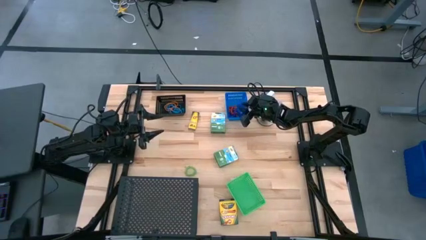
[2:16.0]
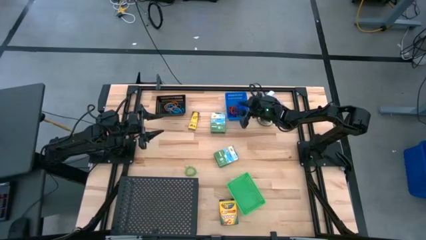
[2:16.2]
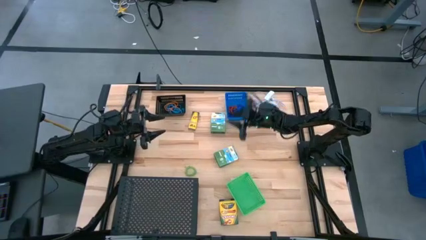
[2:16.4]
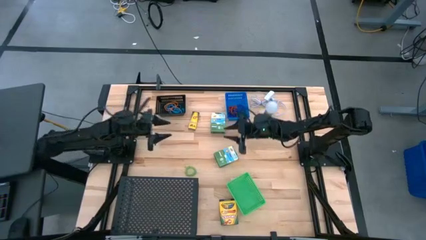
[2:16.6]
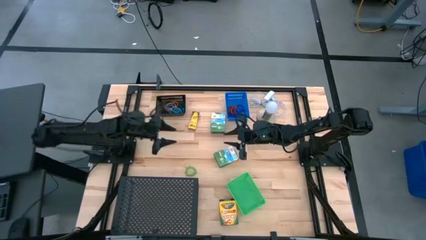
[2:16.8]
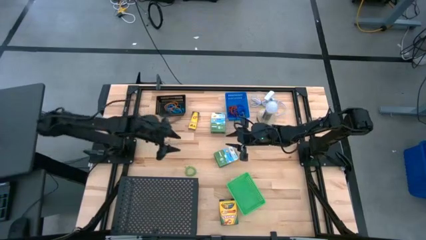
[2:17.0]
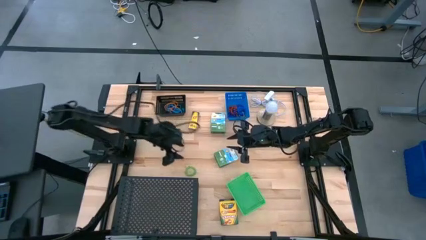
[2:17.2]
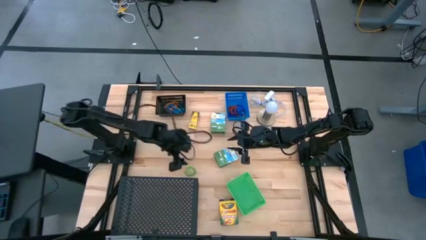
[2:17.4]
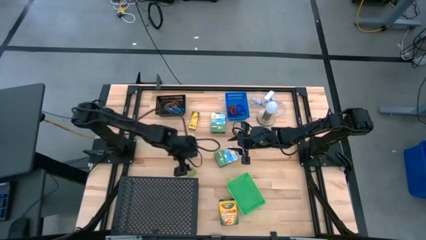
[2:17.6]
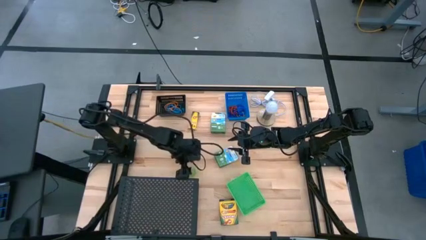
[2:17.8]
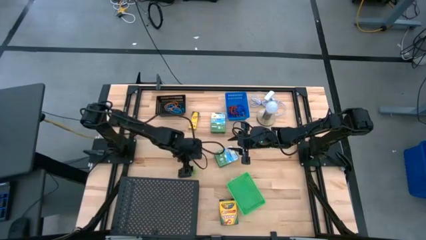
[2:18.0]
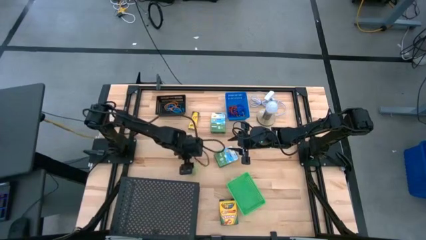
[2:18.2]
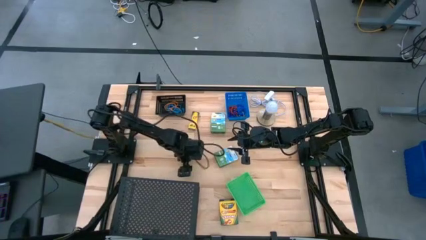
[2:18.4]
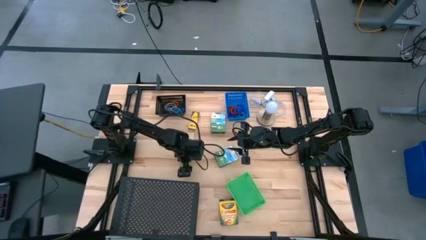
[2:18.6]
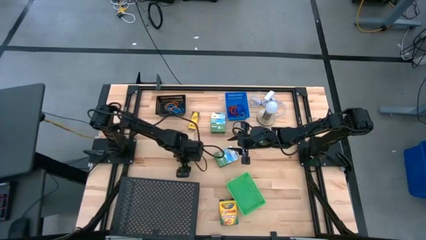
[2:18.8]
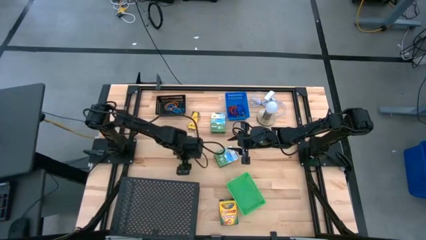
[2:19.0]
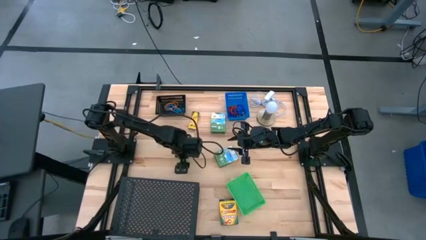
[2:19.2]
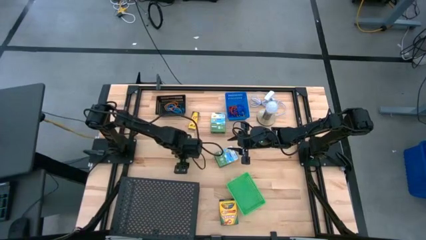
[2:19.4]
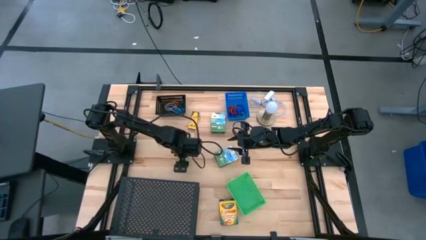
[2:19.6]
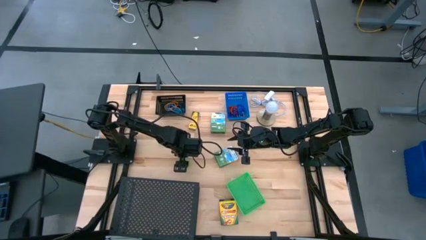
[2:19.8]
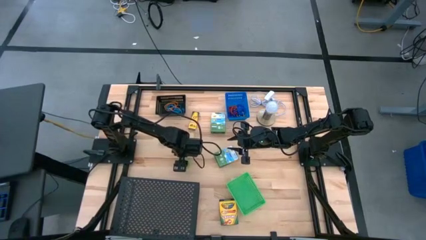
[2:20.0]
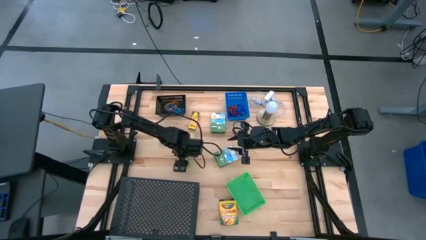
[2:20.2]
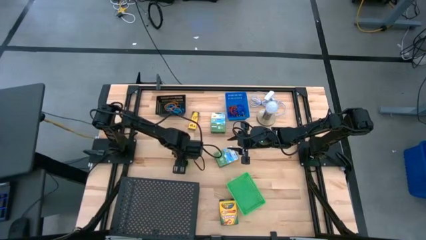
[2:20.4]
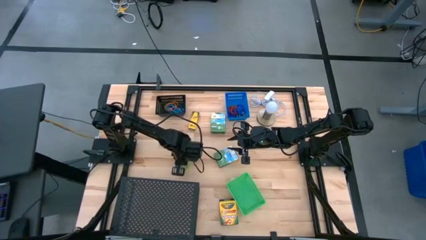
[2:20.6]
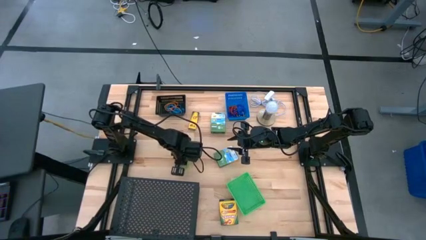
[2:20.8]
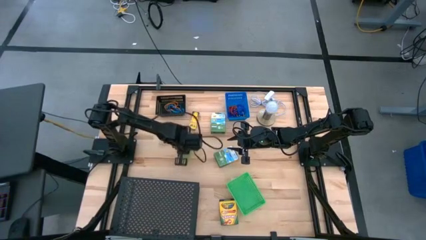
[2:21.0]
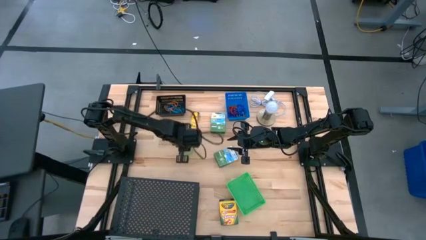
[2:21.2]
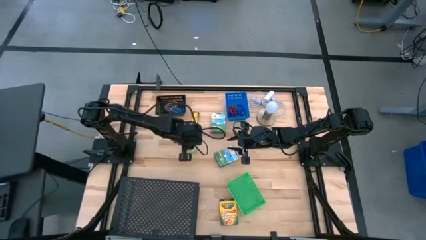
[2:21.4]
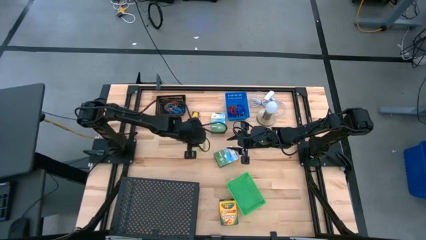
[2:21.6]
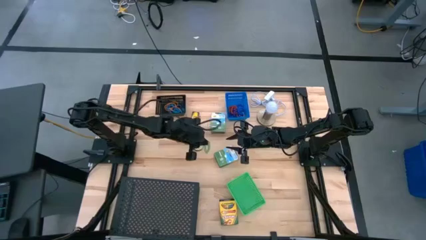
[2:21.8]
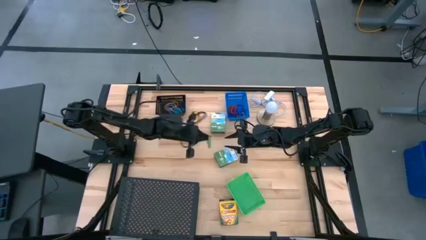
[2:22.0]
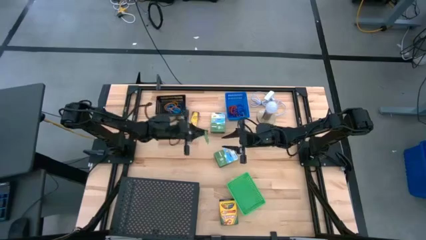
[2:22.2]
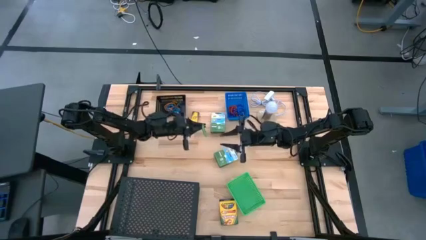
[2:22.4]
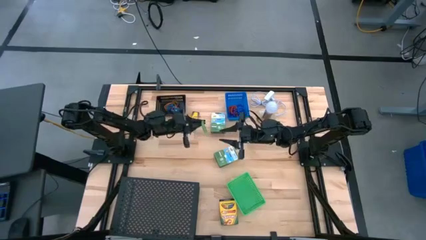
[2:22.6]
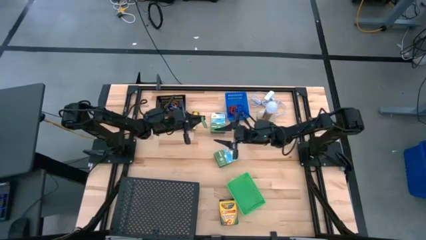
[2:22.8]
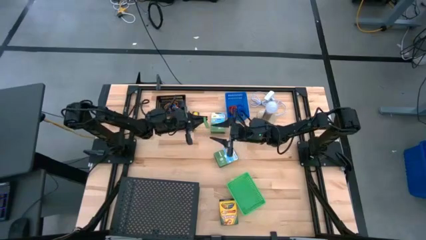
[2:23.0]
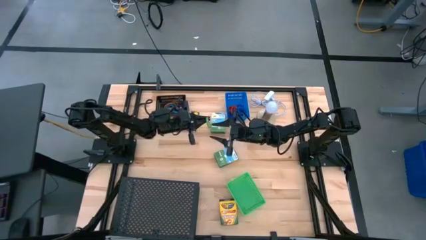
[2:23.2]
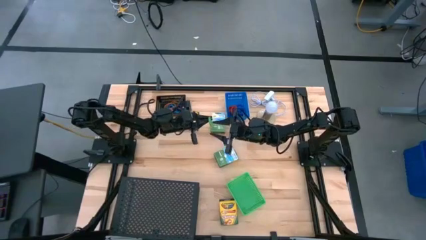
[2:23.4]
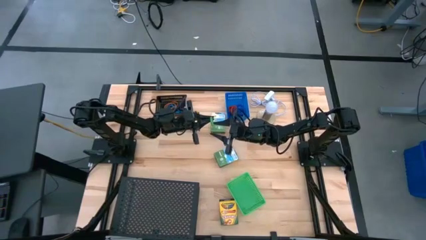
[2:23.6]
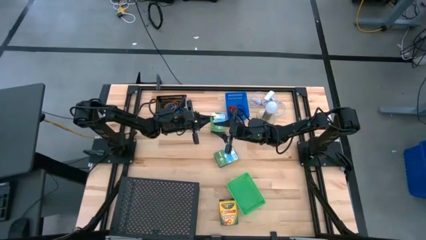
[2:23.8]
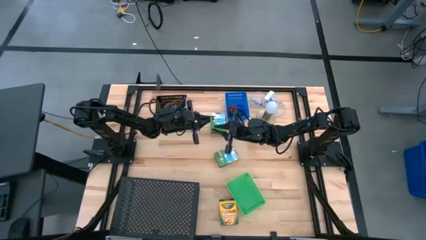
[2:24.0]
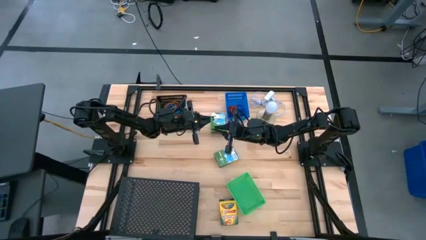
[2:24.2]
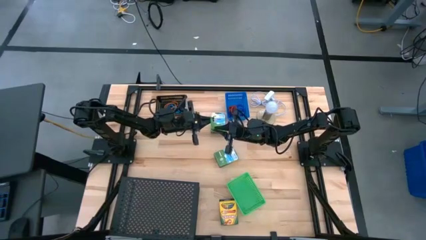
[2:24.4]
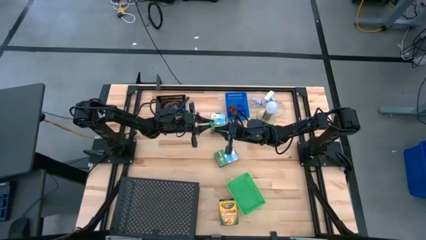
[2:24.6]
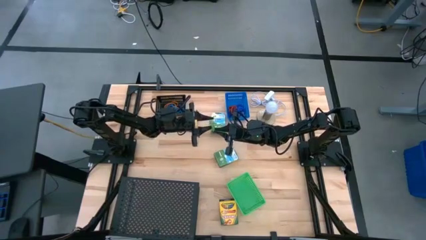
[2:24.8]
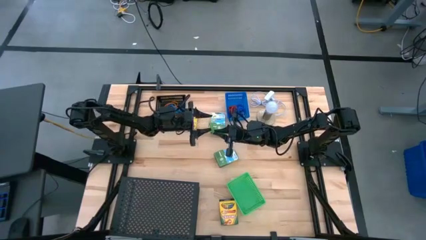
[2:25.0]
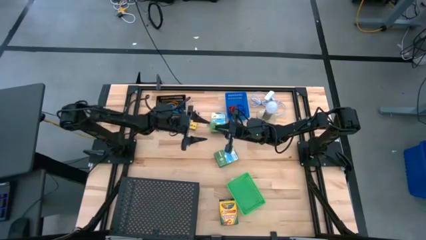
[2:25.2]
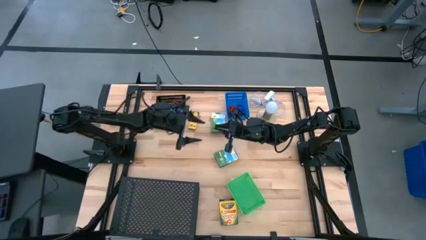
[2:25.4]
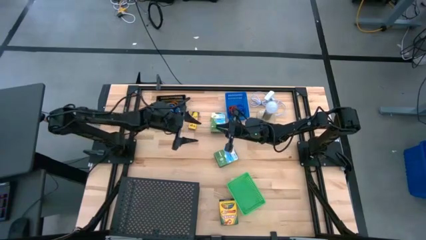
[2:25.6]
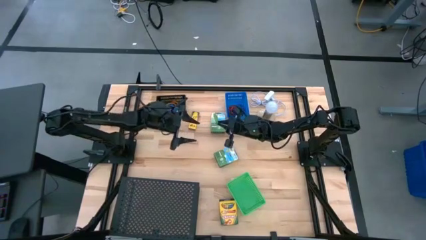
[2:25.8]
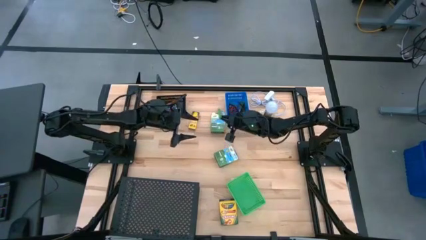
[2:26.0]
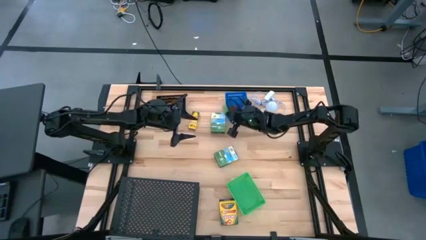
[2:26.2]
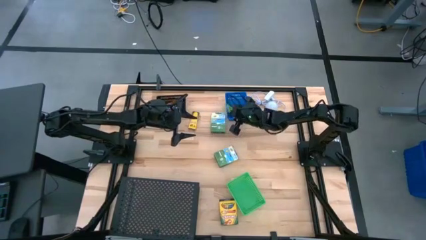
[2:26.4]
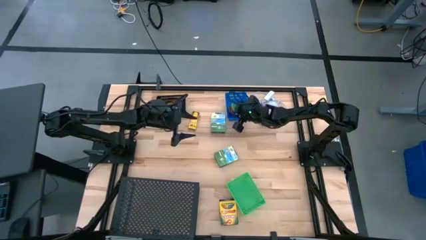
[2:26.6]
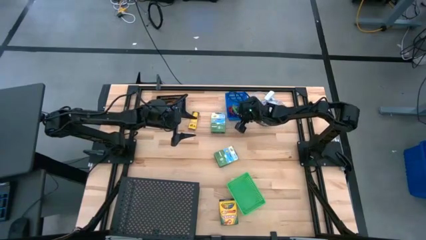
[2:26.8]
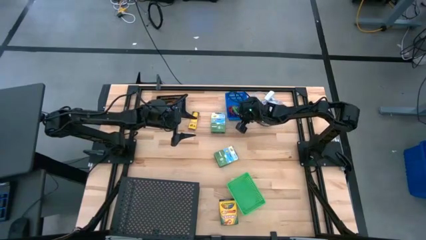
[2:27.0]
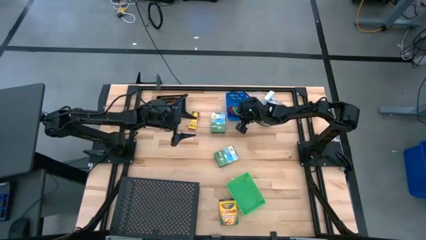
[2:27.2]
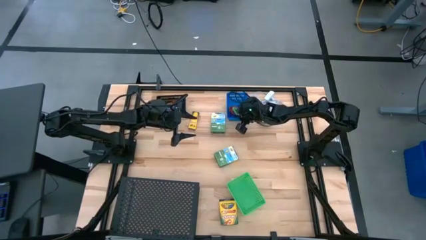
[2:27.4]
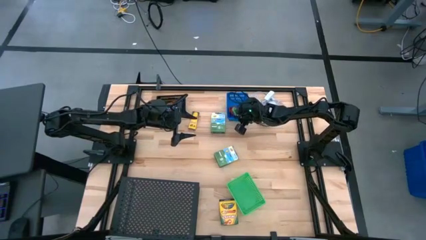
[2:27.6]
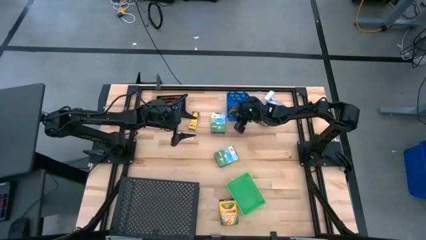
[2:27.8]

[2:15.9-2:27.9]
Task: Pick & Place Office Desk Supplies
Put the green spring keychain into the blue bin

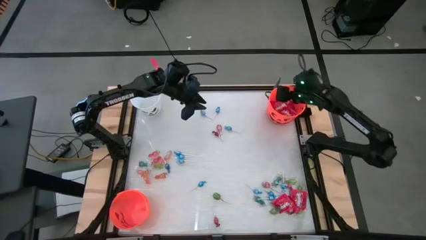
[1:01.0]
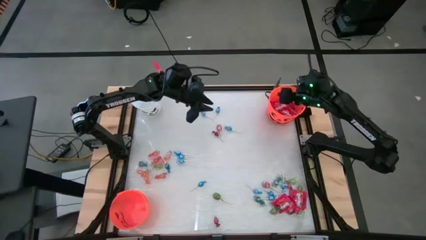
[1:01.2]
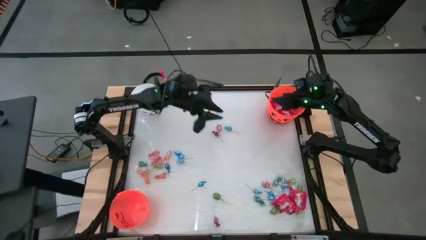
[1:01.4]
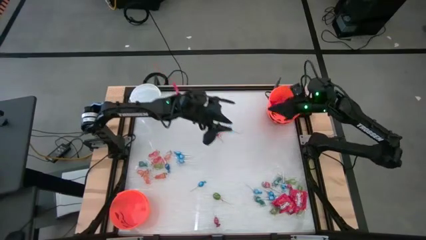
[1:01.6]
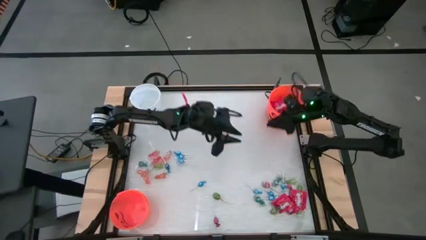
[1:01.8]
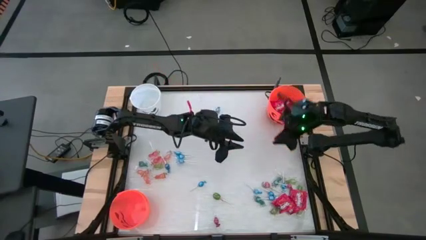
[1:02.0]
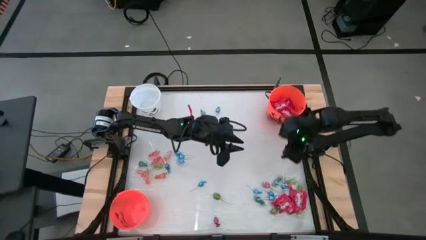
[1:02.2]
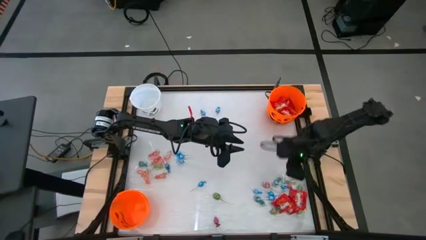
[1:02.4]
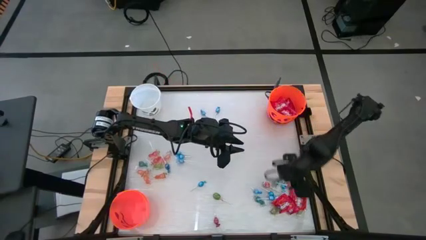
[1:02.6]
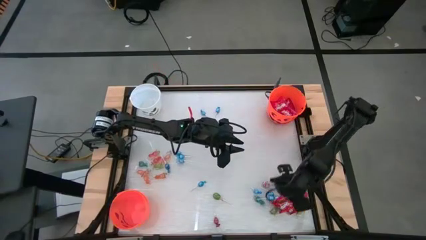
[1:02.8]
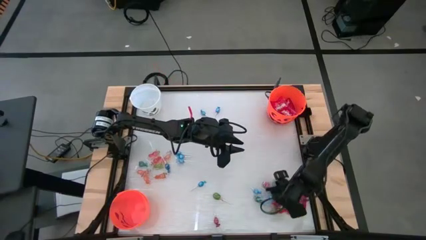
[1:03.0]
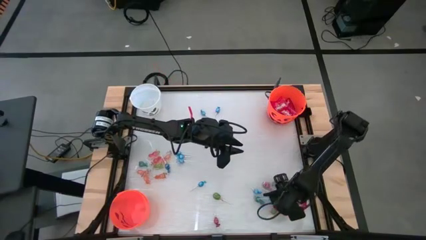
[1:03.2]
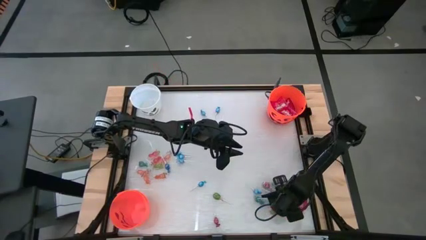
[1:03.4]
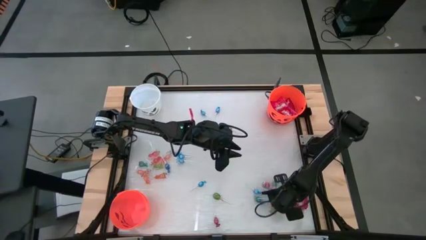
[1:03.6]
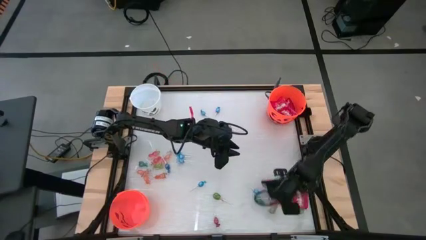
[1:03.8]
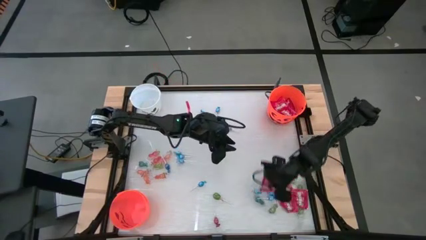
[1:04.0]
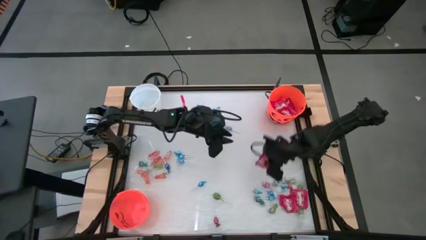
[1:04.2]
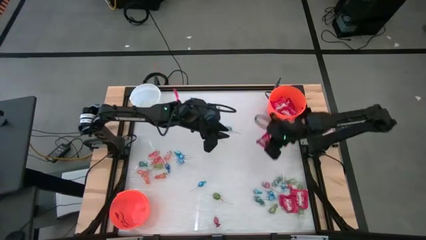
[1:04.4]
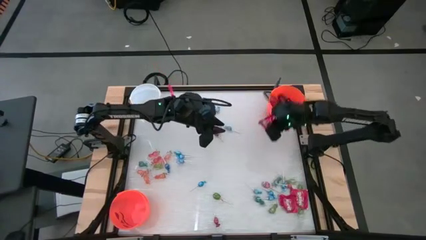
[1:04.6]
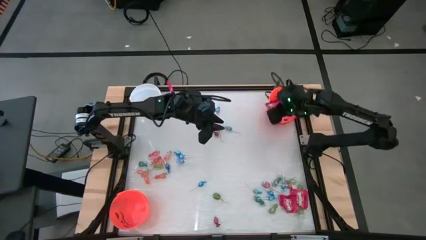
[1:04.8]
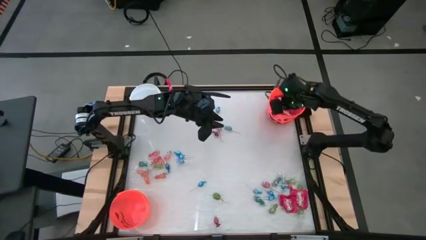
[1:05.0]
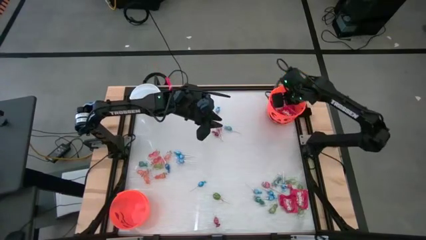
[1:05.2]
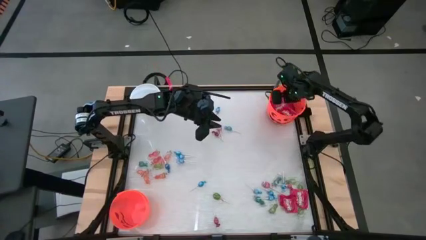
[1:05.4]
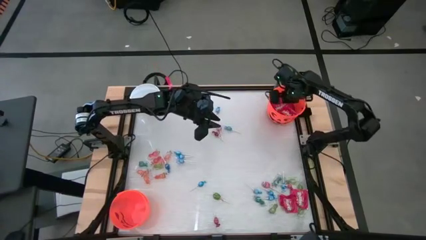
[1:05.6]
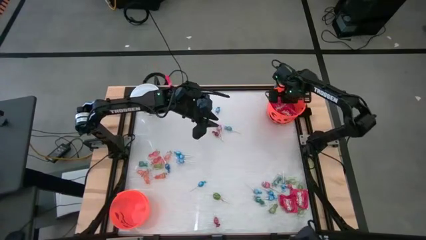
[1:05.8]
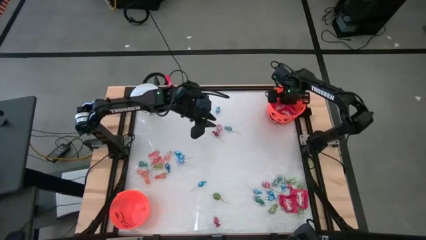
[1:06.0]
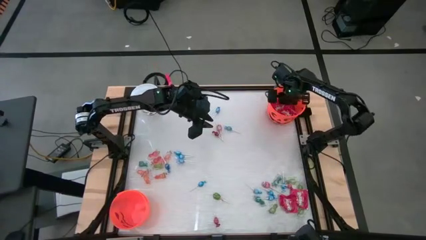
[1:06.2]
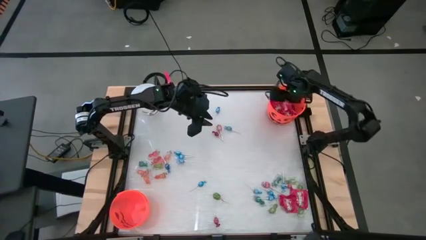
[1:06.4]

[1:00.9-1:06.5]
Task: Sort candy by brand, put in halloween buckets
Put the red candy into the top orange bucket
